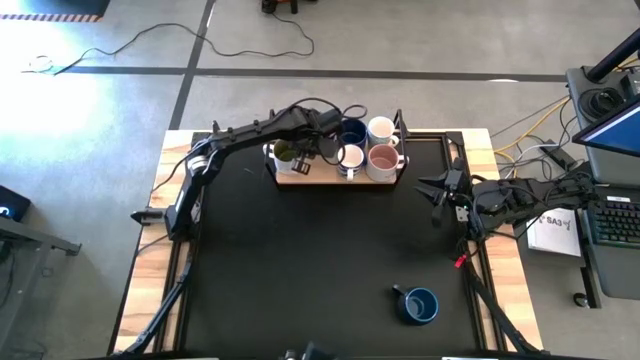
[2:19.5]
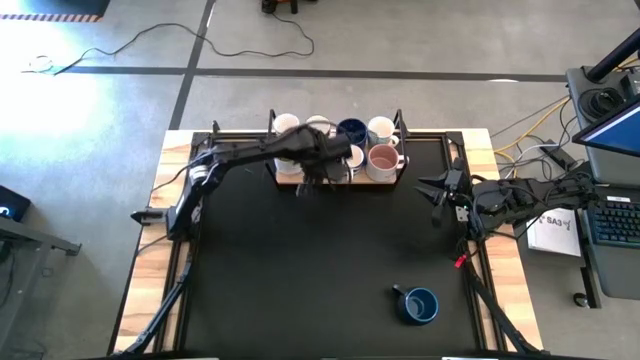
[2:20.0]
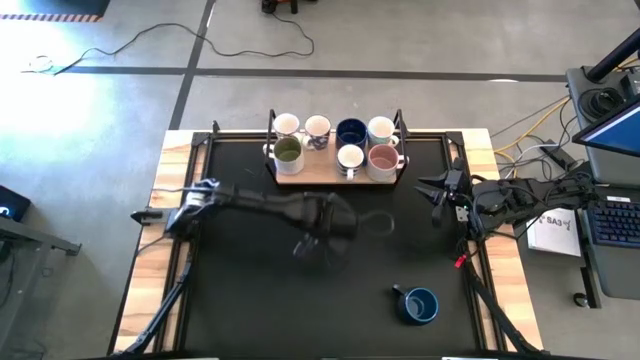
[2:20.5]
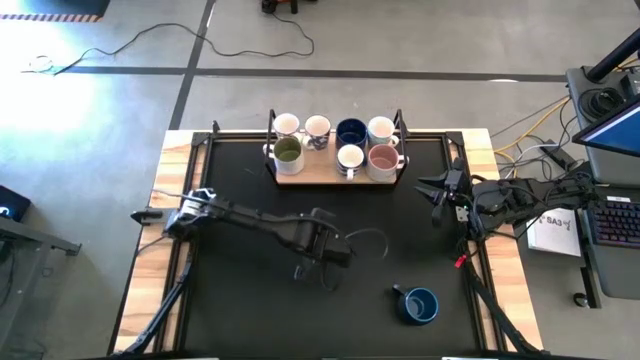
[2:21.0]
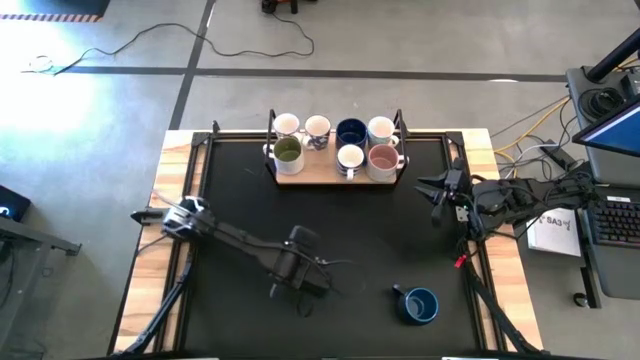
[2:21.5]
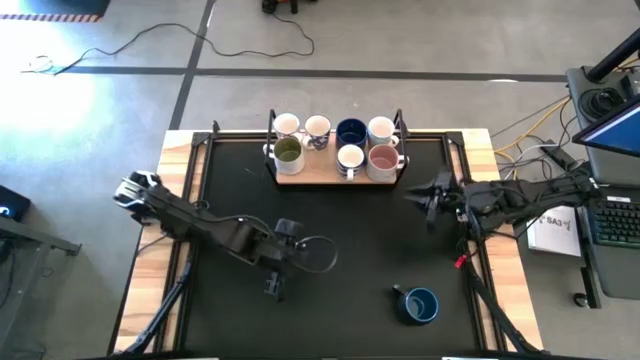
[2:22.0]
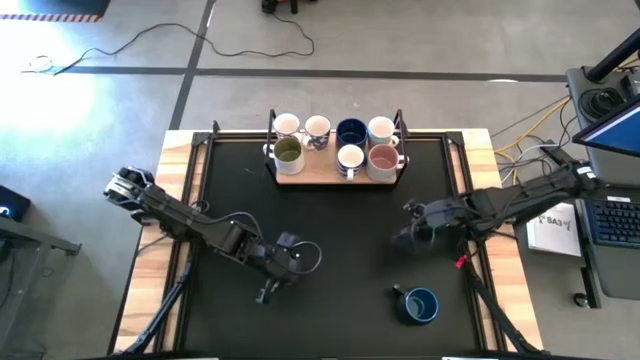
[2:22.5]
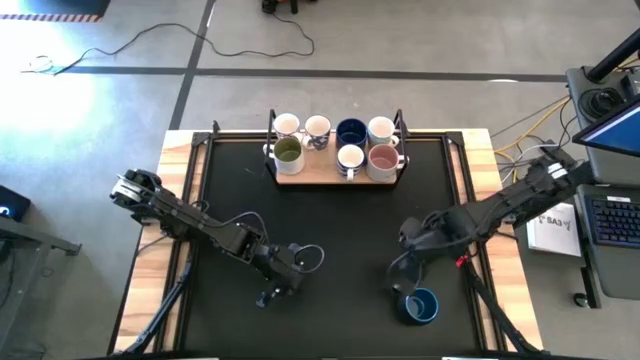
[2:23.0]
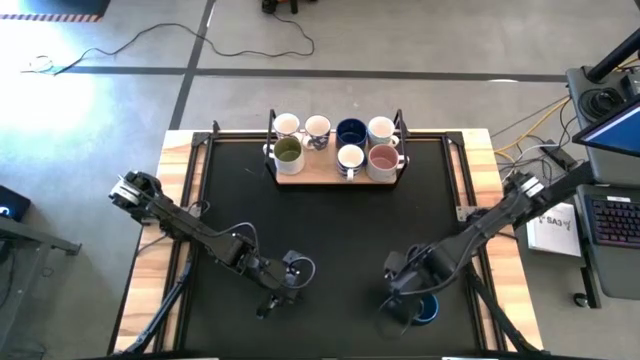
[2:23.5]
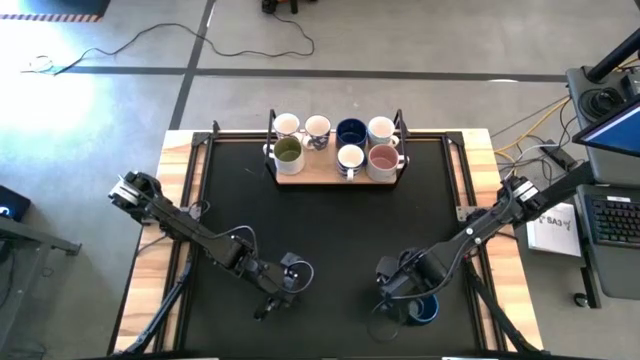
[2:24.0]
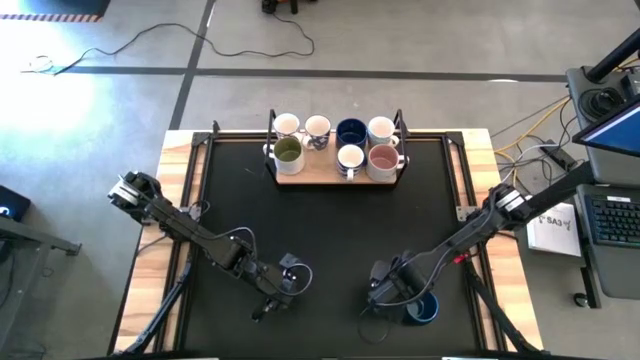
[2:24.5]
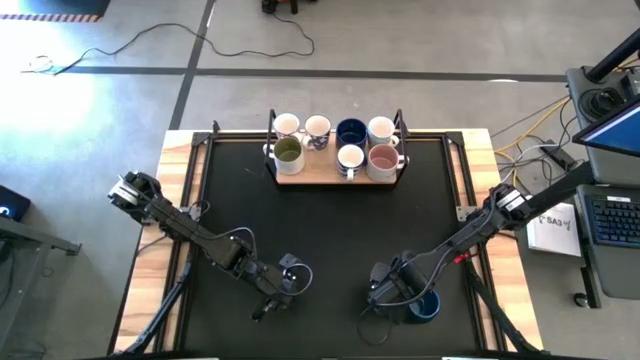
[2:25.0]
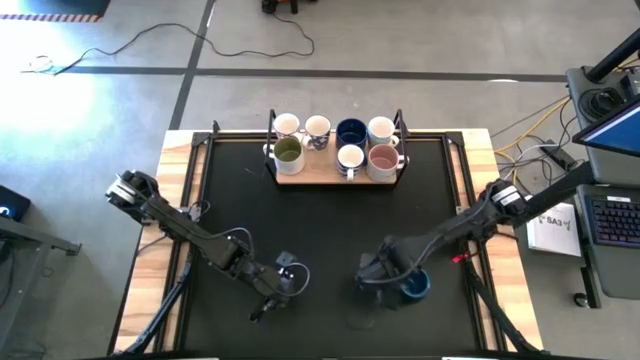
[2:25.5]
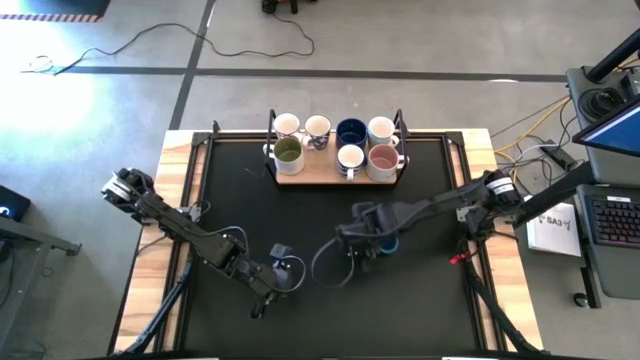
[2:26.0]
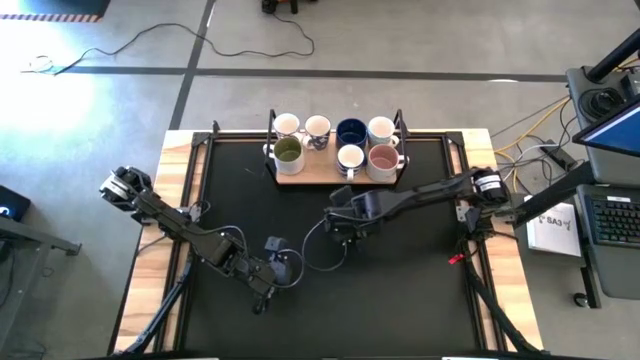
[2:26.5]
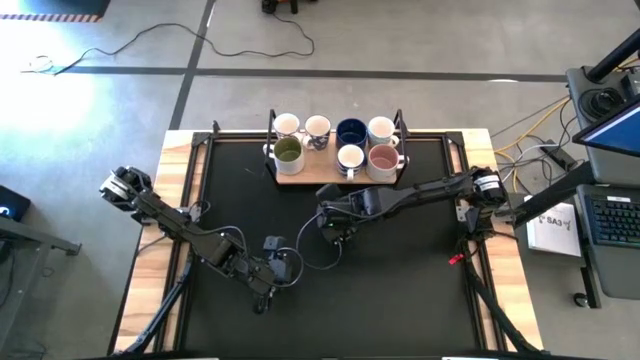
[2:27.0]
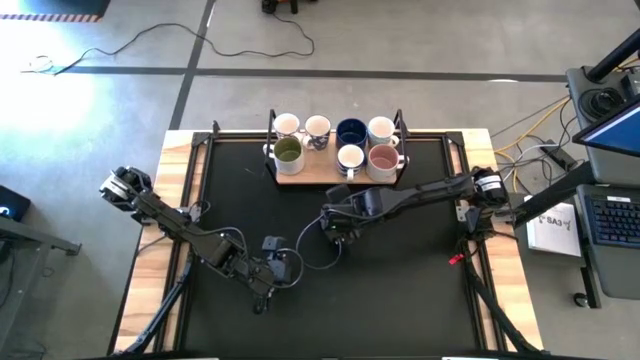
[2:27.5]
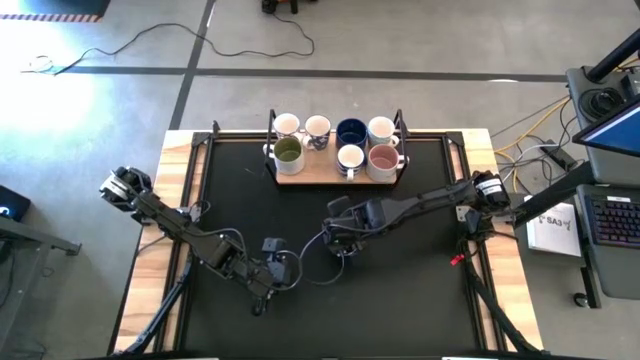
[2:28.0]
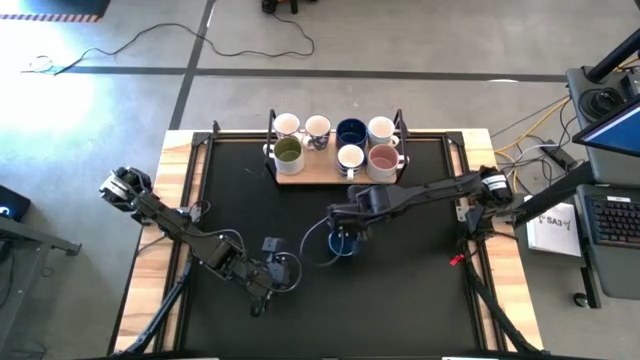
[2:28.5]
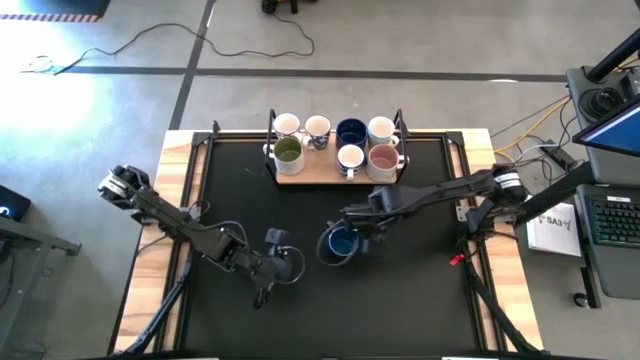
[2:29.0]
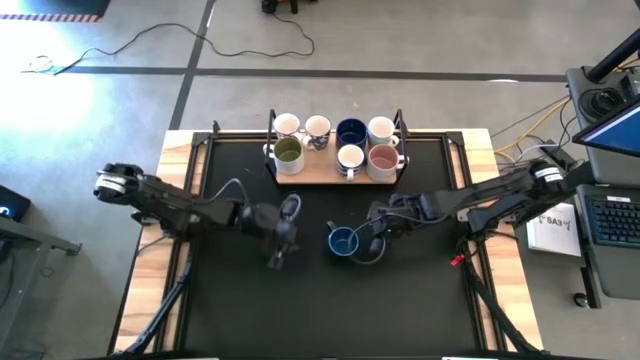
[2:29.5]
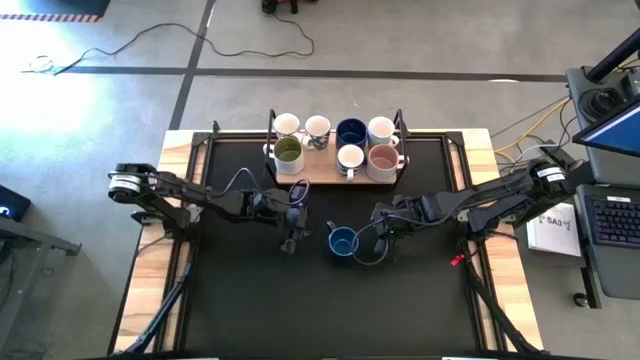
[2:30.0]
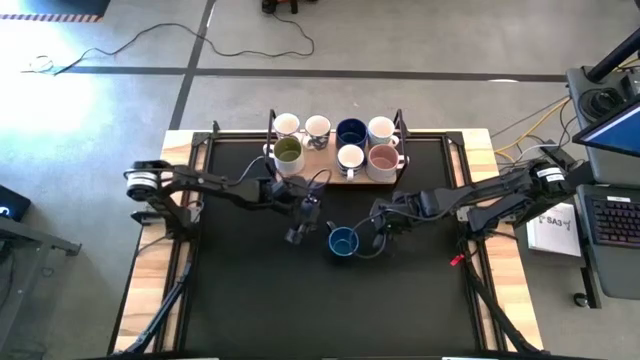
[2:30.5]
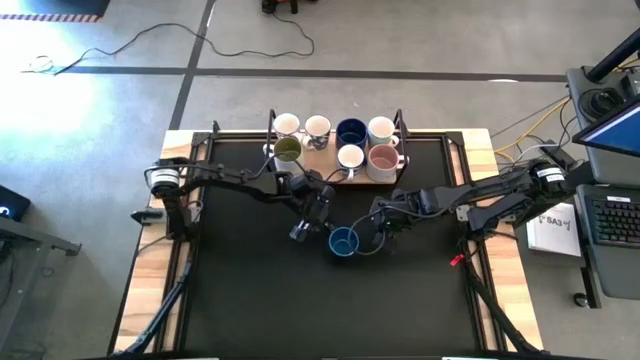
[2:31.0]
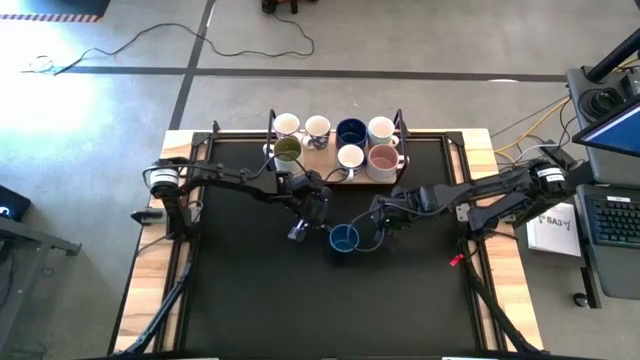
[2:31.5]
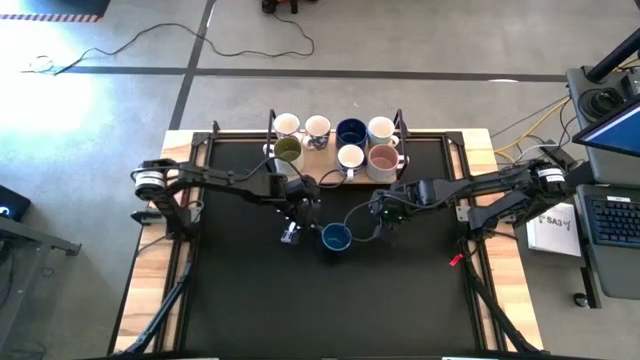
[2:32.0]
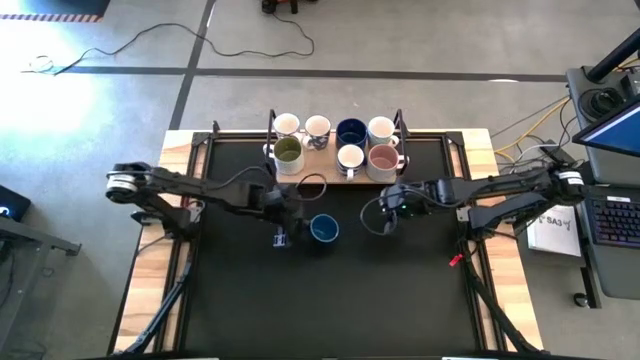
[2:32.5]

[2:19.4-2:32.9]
Task: Place coffee mugs
Put the black mug on the shelf aligned with the other the blue mug

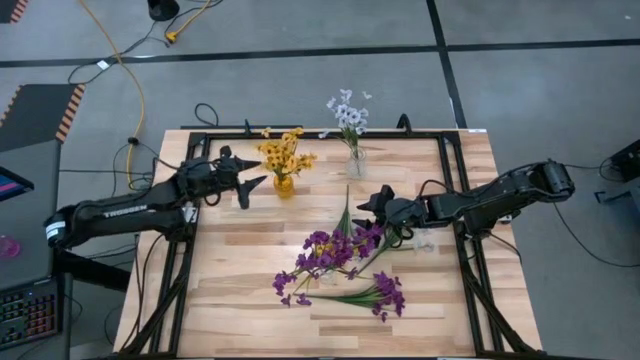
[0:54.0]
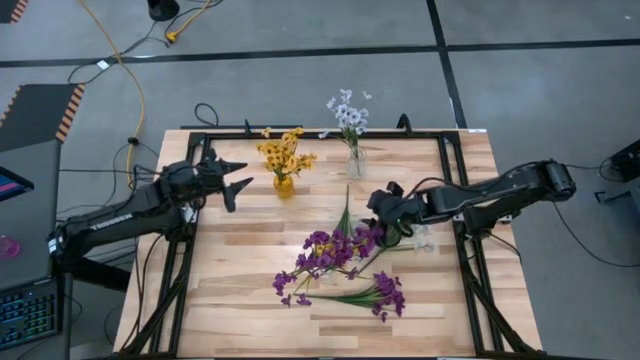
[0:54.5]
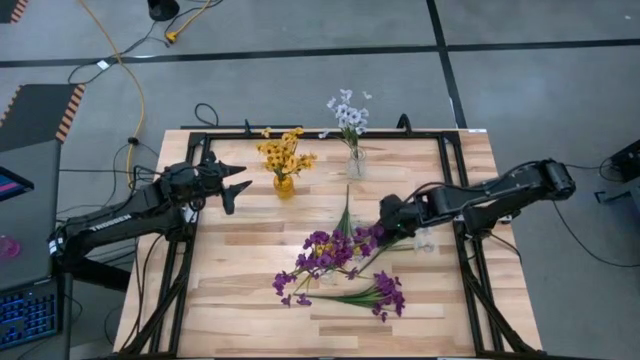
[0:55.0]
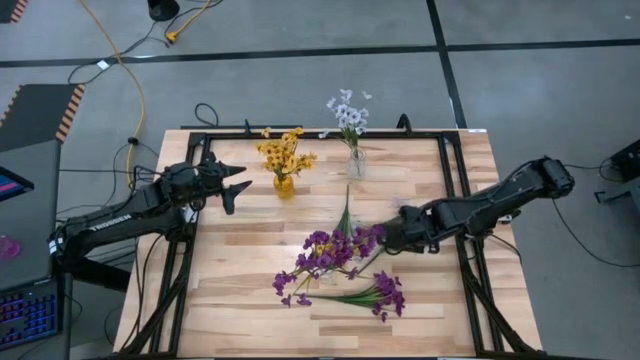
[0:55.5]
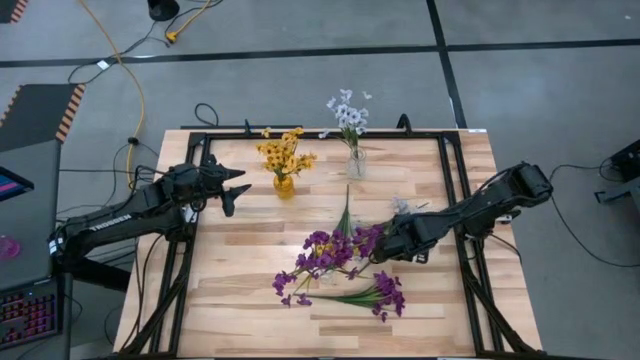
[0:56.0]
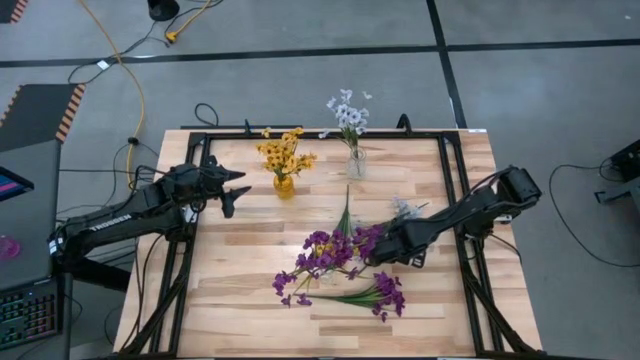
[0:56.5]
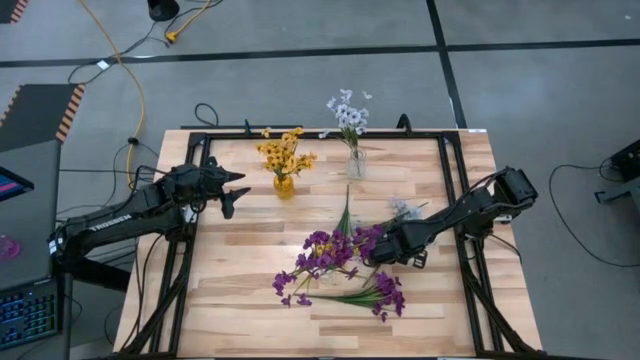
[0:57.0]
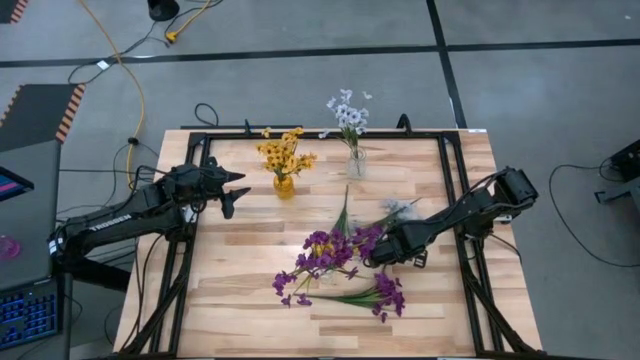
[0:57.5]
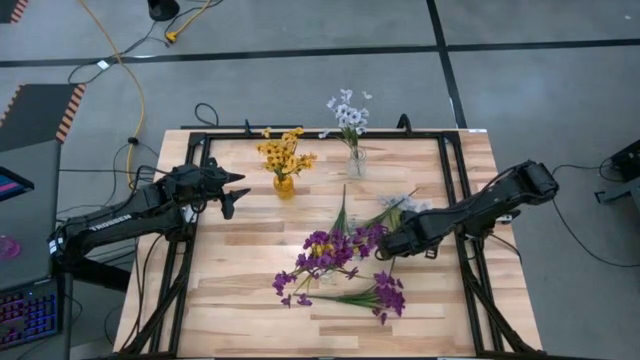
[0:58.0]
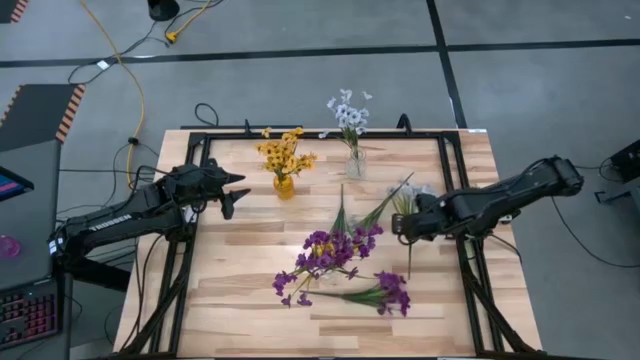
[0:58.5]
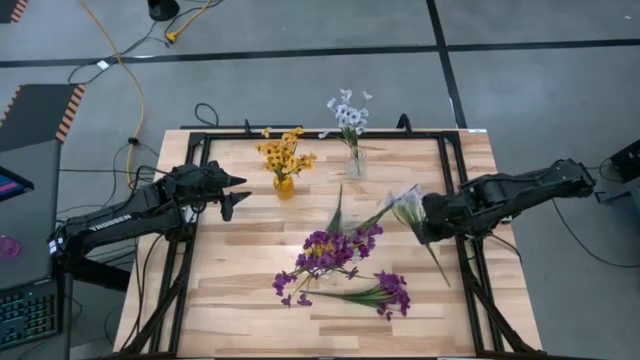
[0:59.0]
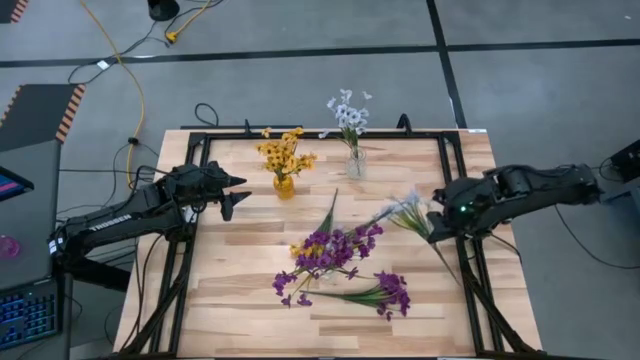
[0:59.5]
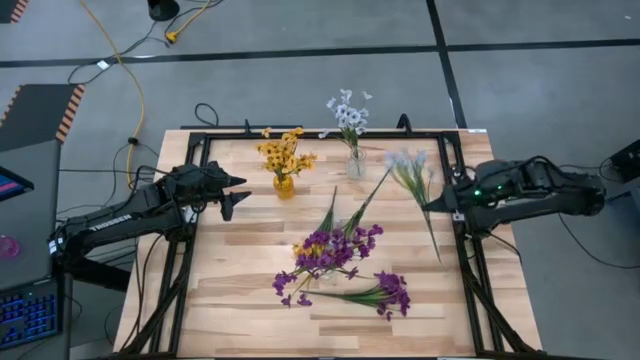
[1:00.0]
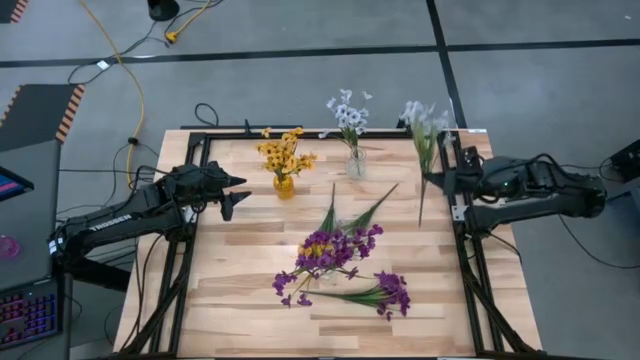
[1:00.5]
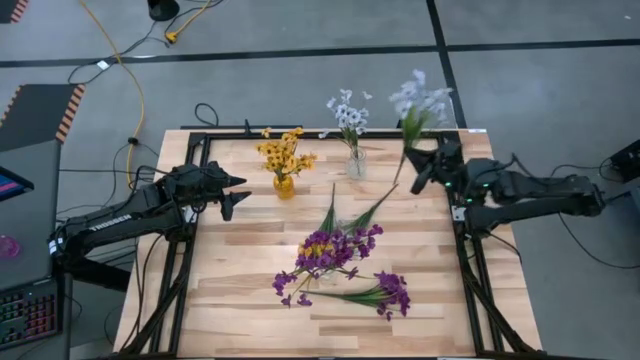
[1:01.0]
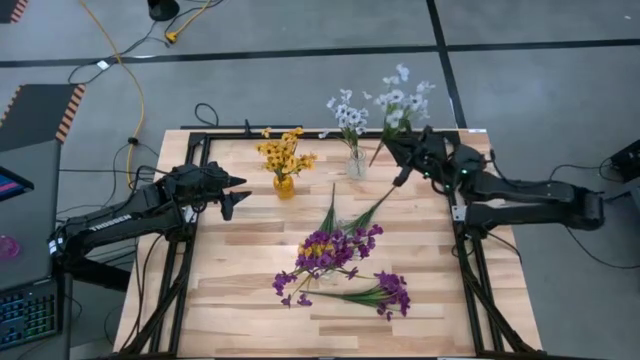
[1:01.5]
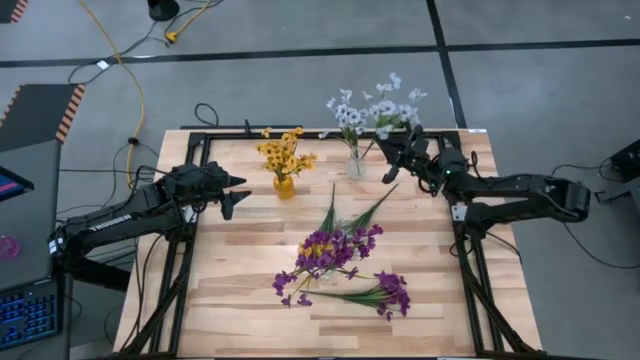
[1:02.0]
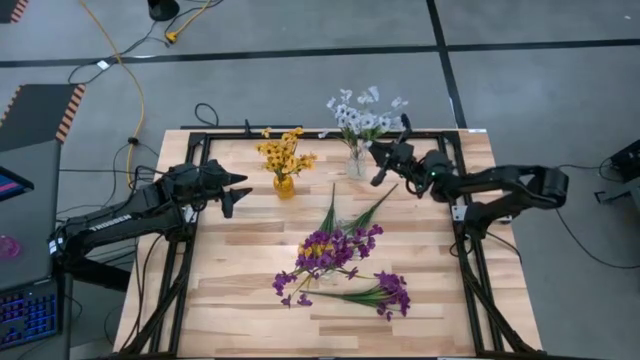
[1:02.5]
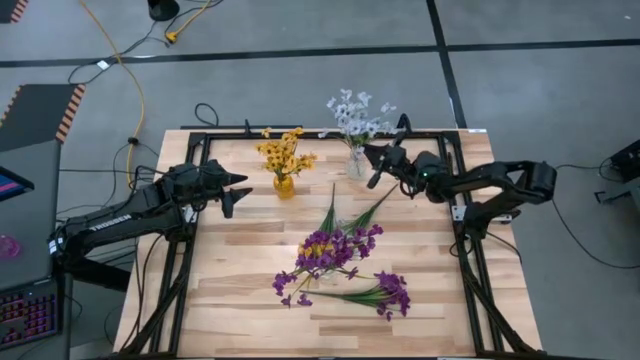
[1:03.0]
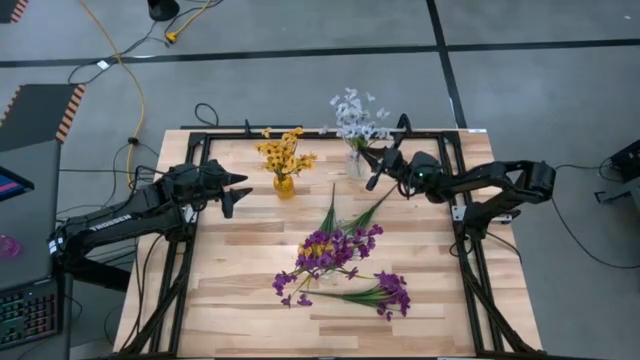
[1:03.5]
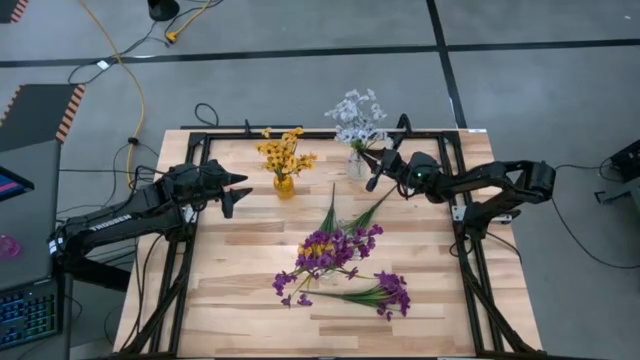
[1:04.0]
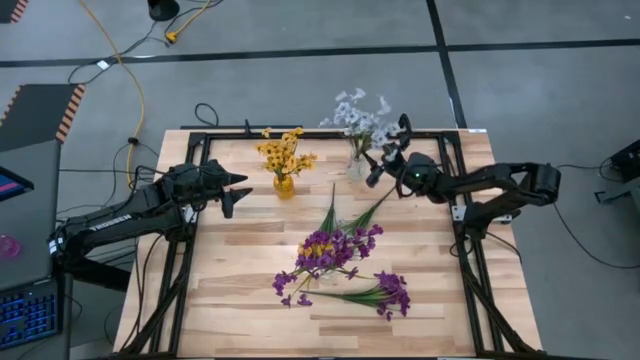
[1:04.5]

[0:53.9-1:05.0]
Task: Sort flowers into vase by color
Put the right white flowers into the top transparent vase
